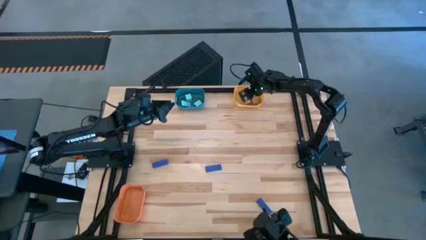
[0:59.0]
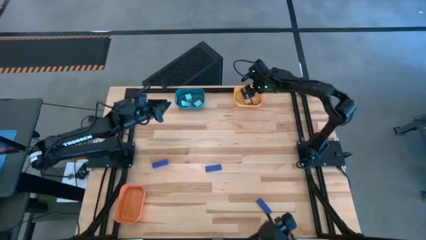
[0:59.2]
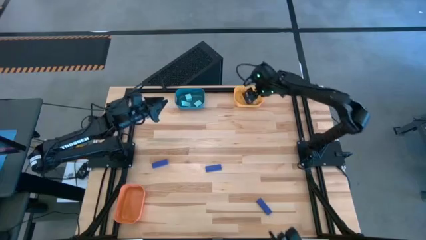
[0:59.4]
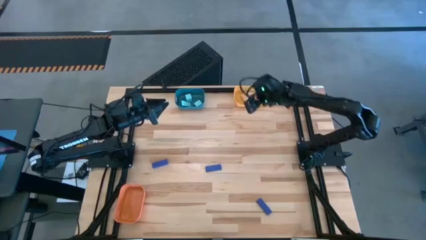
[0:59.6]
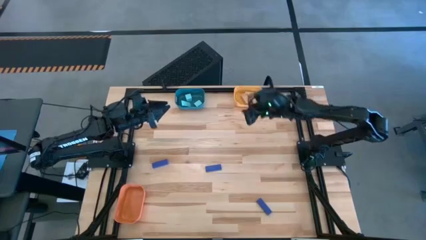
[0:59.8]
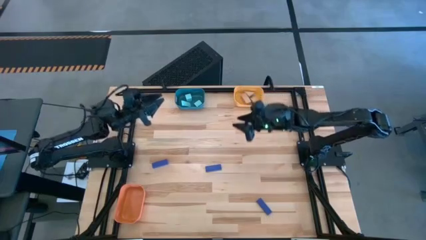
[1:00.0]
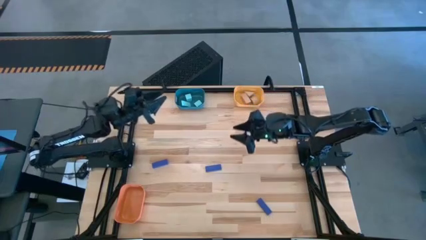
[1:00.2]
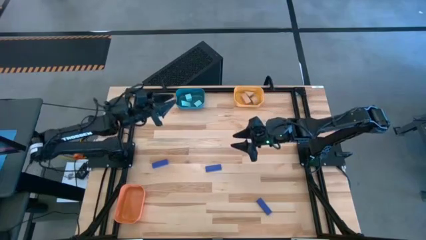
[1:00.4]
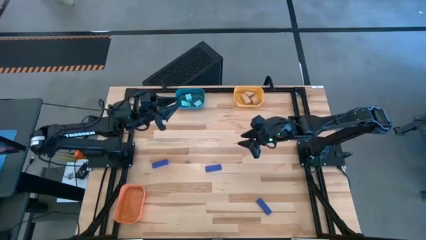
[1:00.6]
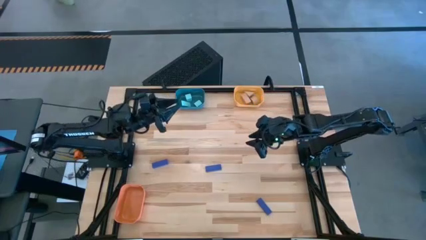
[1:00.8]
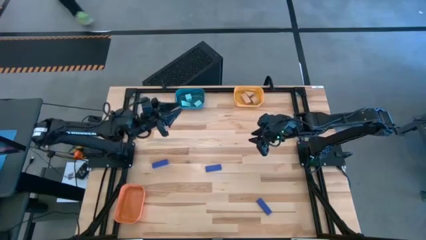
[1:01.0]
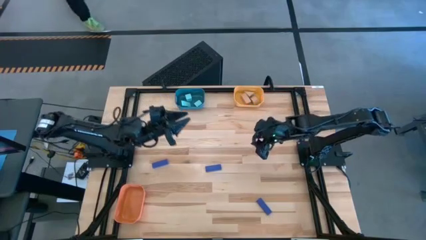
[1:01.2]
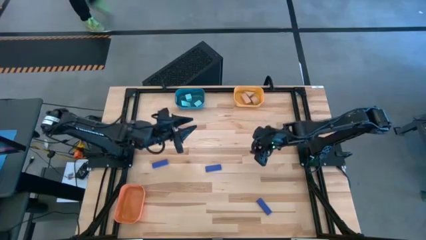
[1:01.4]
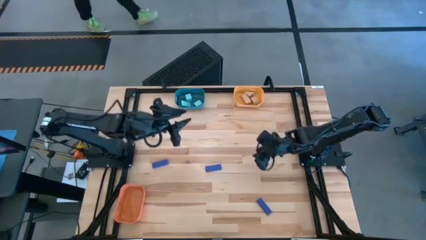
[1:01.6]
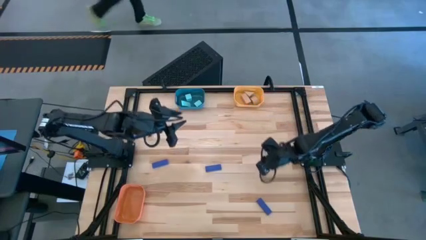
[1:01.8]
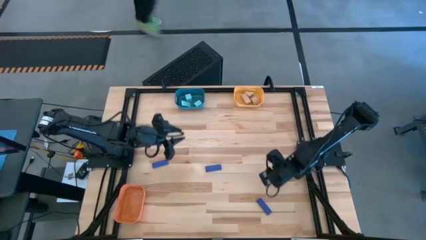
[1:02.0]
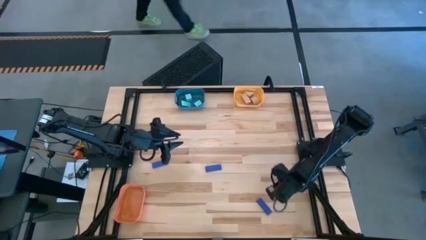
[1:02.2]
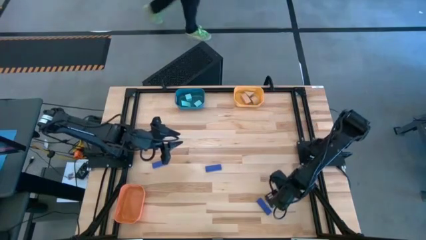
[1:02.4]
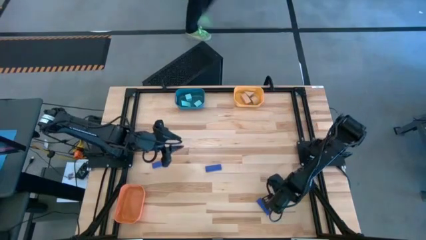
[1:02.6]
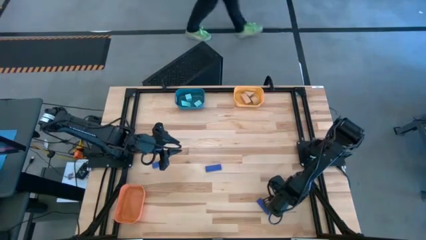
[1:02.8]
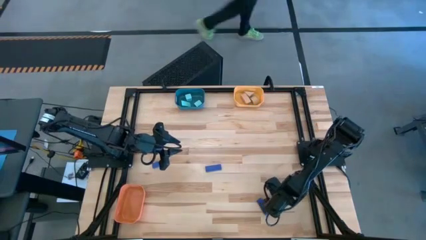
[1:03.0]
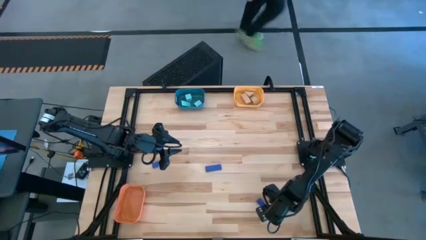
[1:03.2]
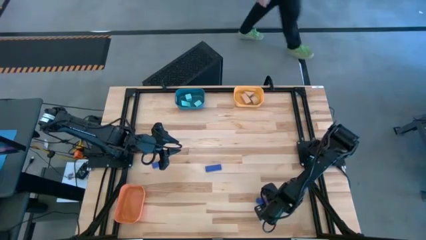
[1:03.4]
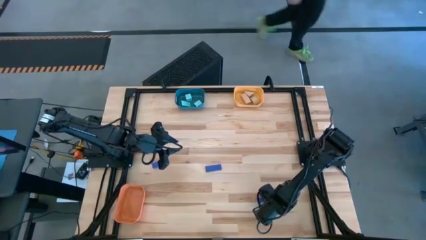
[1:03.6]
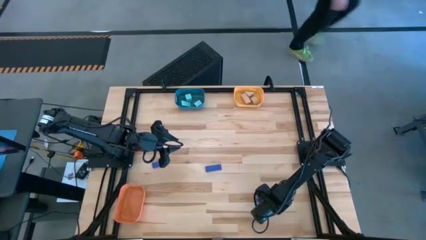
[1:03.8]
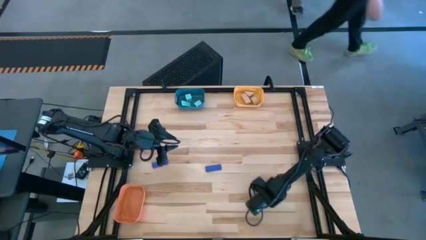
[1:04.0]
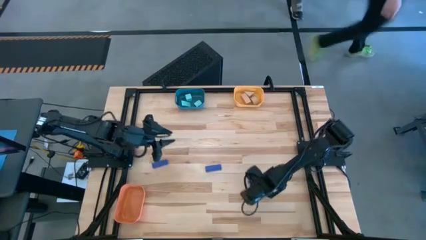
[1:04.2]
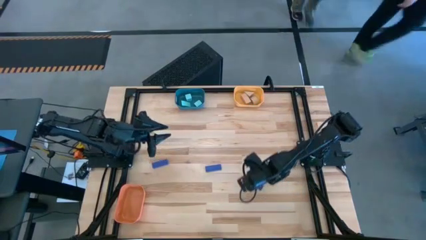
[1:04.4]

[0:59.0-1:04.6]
Task: Sort & place blocks by color
Put the bottom right blue blocks into the orange bin

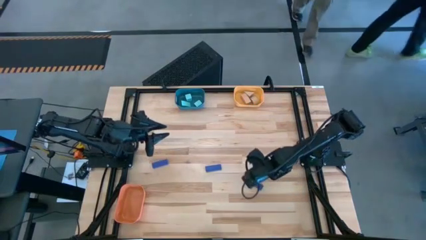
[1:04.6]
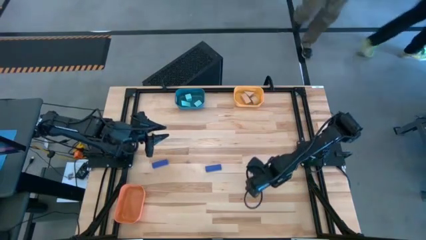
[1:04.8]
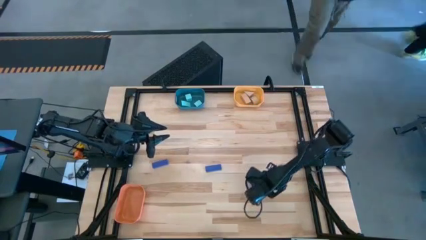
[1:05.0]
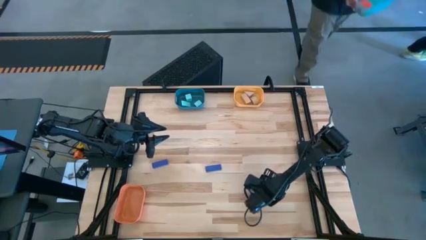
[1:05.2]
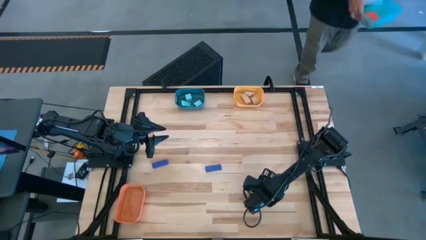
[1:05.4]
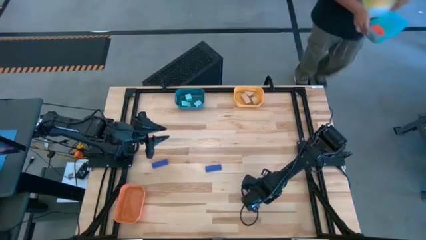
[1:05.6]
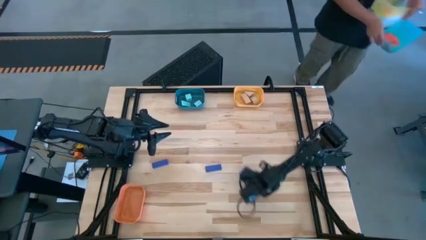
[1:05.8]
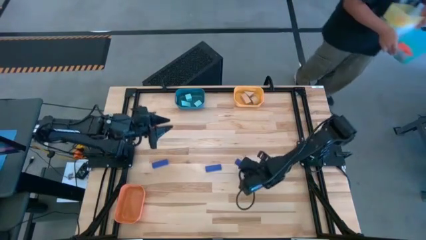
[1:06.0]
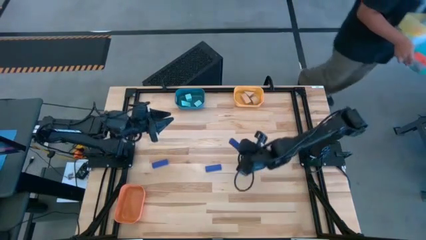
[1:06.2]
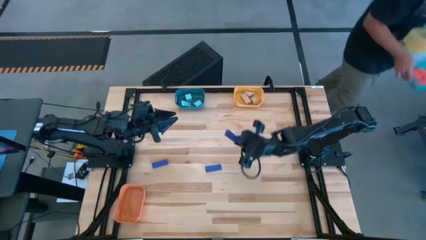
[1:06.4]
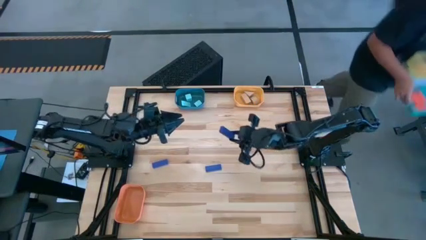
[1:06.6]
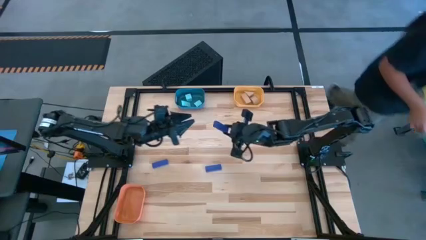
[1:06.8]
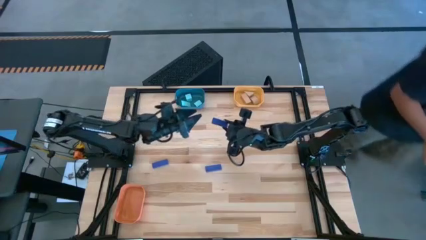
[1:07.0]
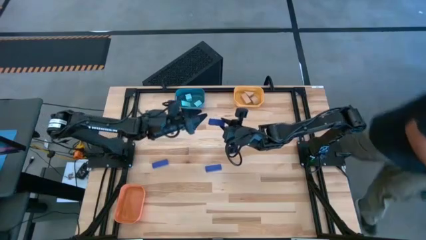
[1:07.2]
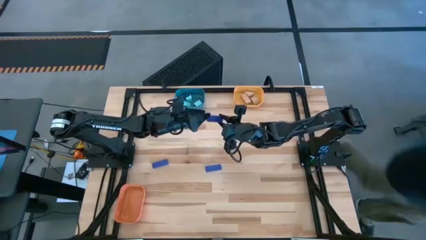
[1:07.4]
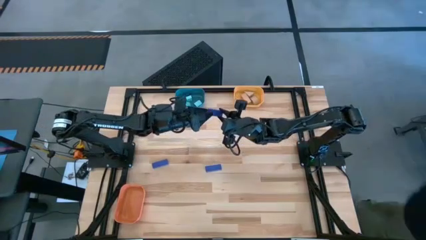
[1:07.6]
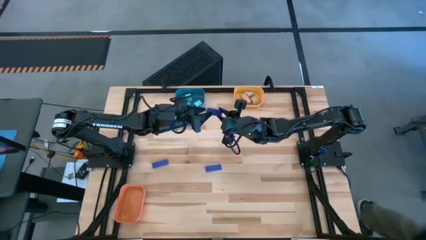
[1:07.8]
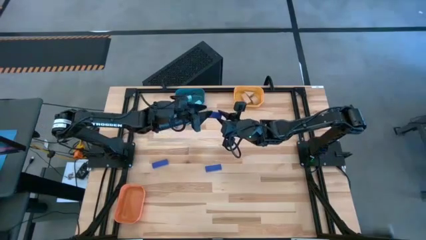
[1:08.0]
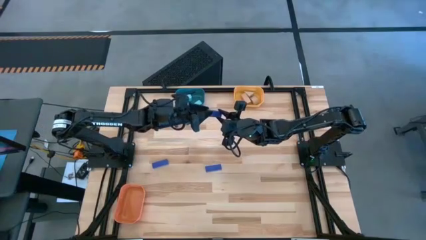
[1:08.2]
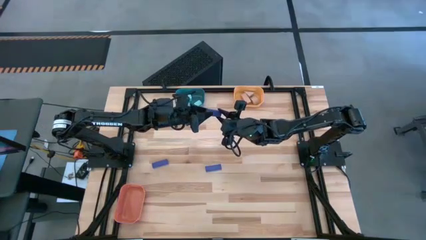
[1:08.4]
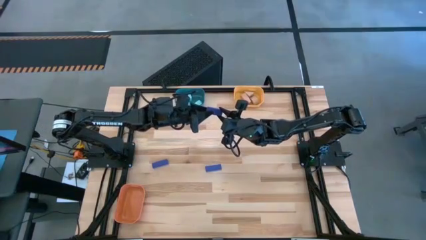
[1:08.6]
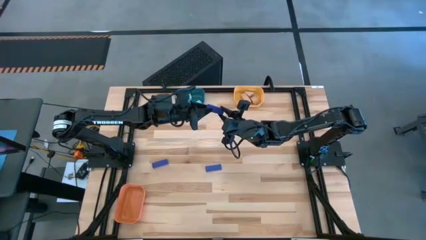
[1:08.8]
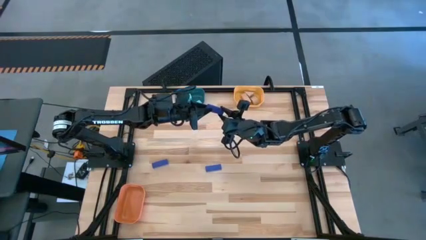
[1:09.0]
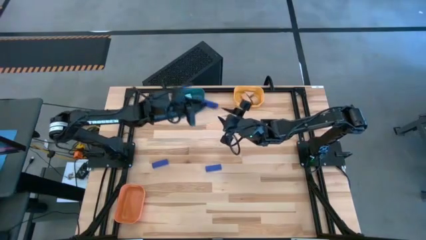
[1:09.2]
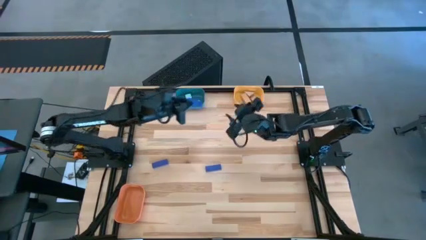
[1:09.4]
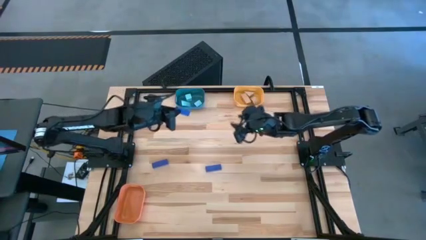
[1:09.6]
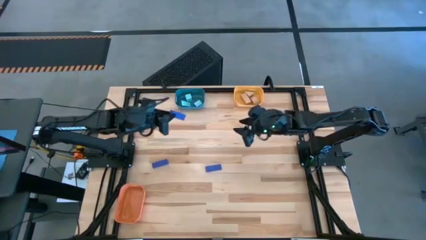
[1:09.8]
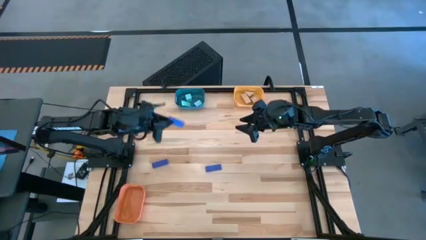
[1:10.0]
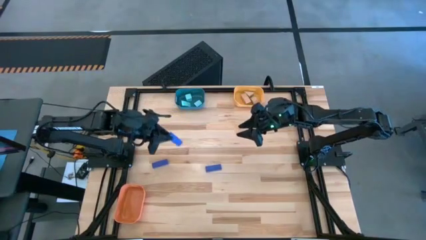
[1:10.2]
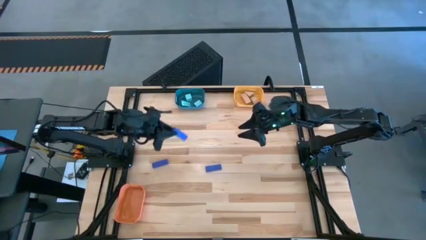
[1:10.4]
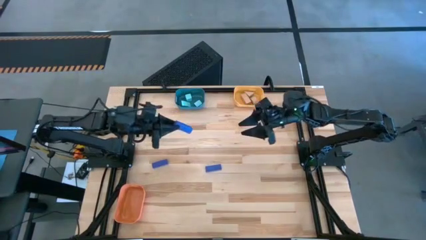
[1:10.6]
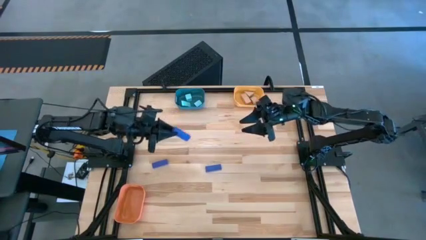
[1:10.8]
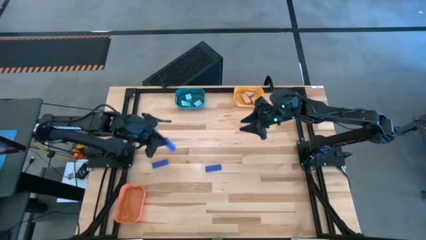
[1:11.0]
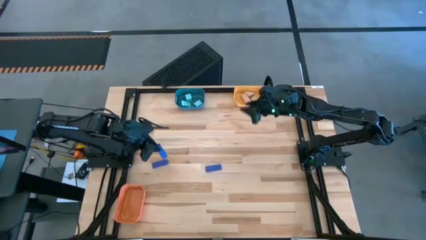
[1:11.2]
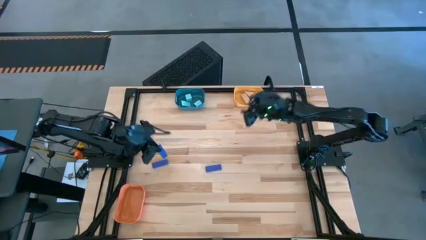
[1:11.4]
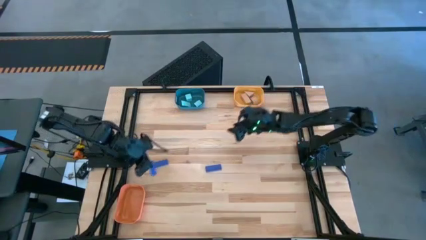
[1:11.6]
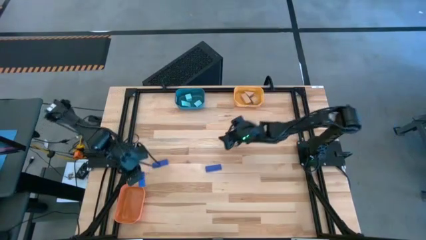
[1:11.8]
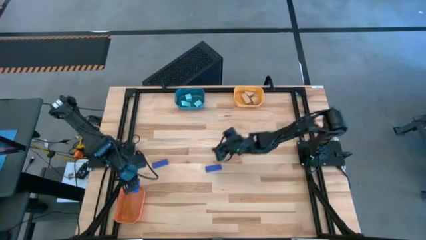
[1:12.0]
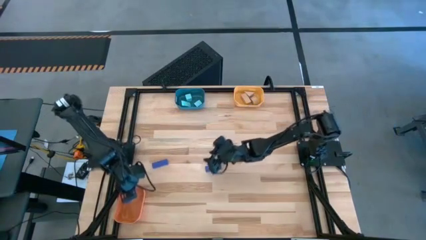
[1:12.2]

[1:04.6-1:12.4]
Put the bottom right blue blocks into the orange bin

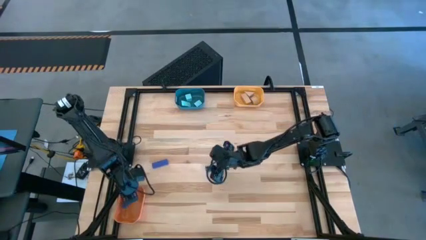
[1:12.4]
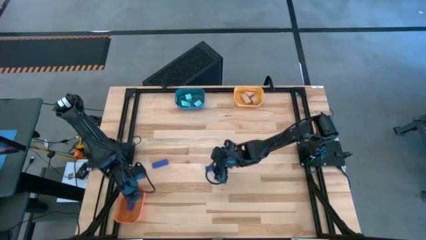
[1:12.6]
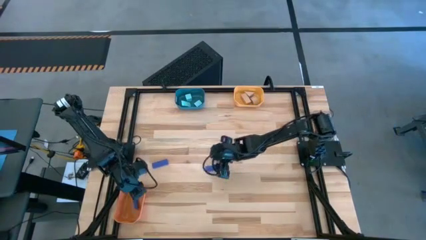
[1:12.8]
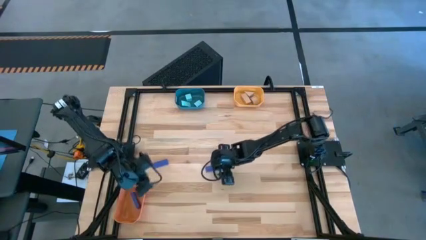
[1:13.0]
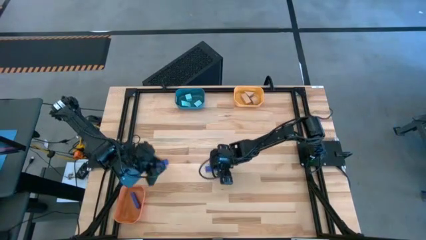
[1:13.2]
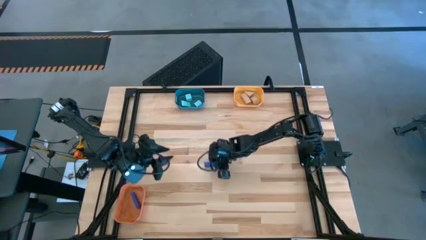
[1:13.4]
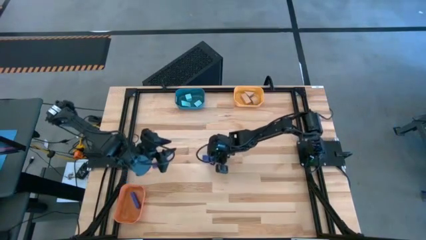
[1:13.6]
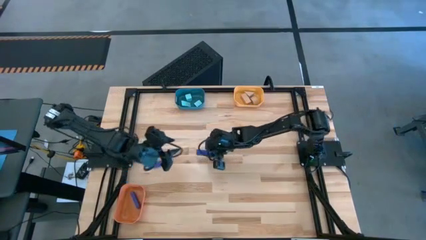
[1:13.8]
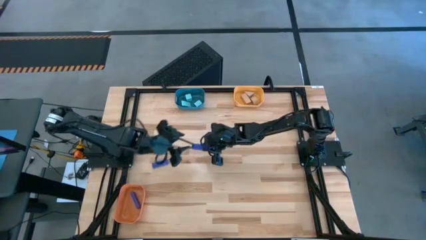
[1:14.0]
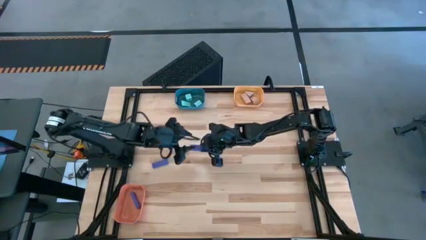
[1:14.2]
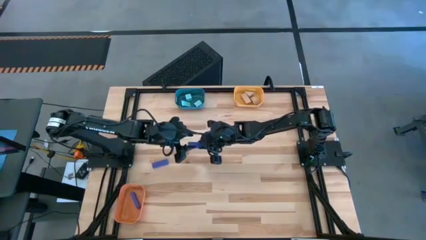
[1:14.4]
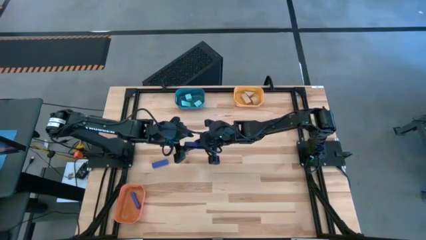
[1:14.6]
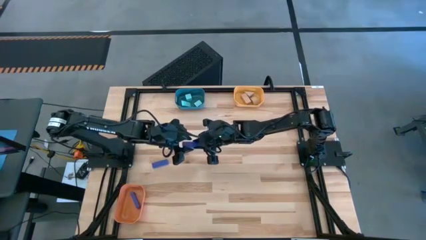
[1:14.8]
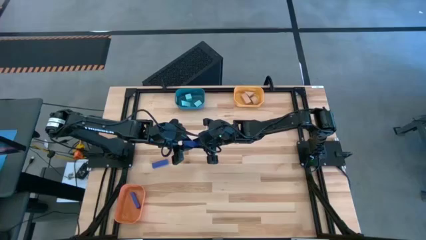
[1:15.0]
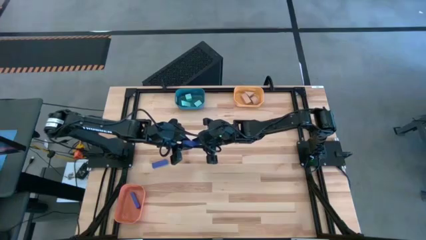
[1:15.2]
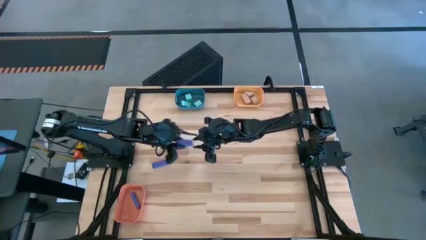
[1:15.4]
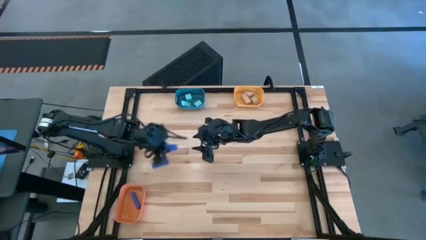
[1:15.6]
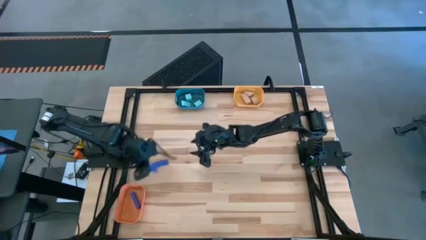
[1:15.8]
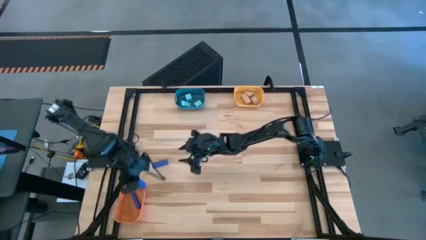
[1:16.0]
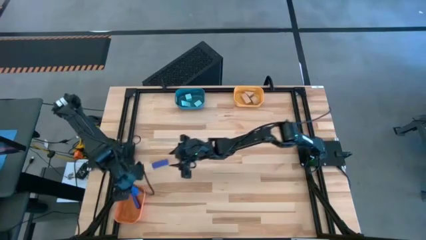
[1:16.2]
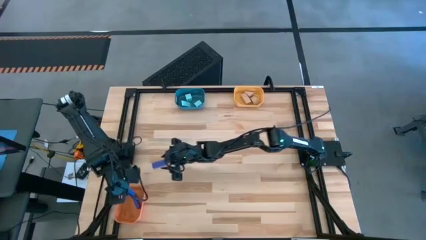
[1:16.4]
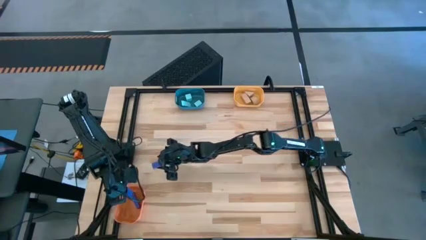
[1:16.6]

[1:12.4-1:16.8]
Put the center blue blocks into the orange bin
